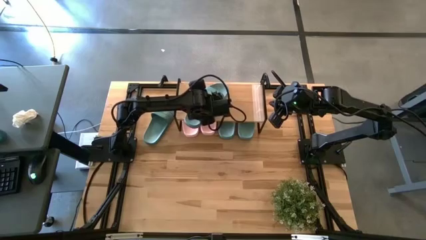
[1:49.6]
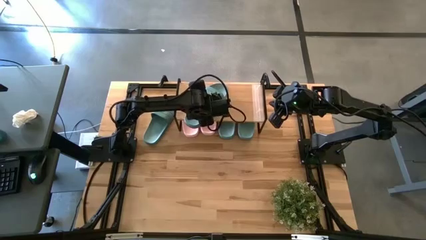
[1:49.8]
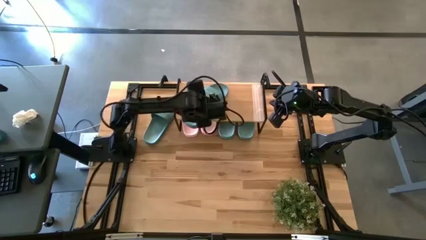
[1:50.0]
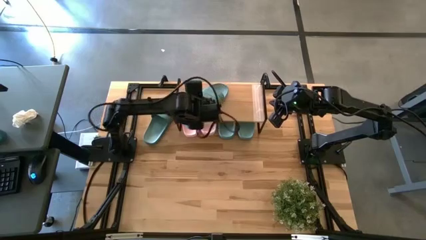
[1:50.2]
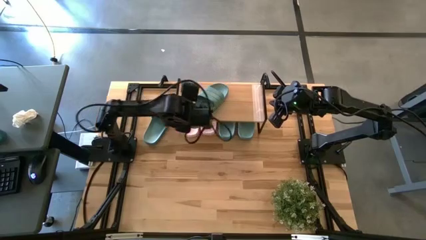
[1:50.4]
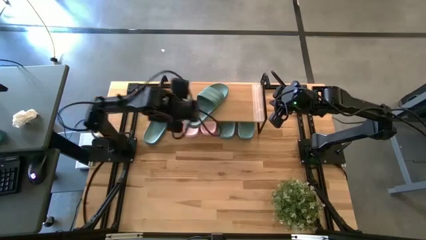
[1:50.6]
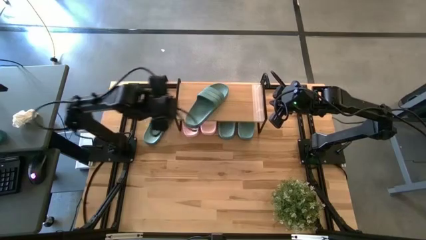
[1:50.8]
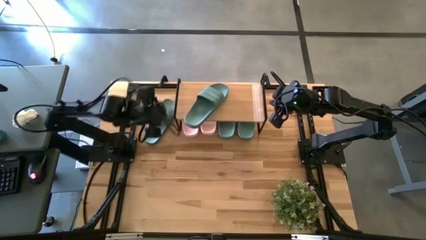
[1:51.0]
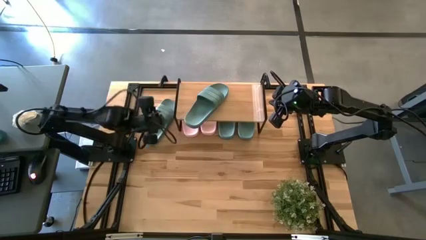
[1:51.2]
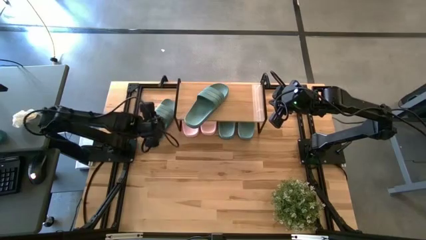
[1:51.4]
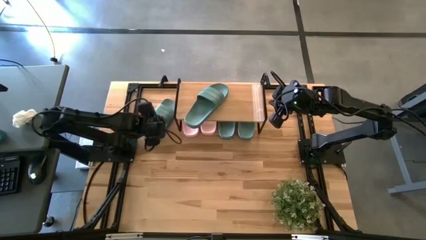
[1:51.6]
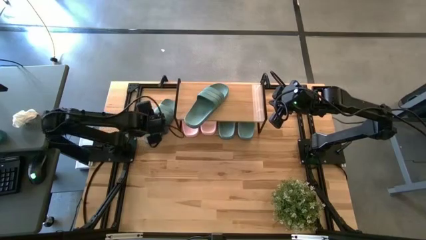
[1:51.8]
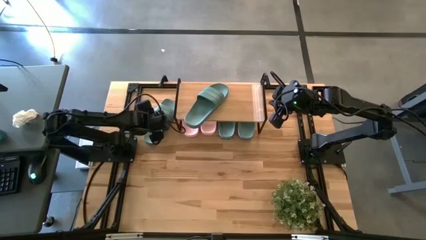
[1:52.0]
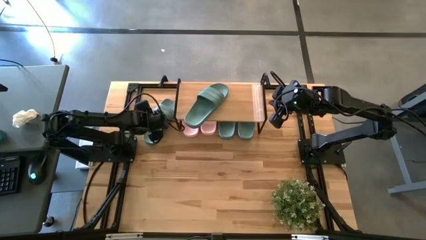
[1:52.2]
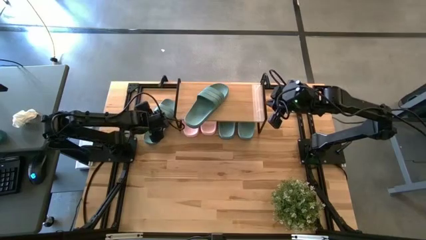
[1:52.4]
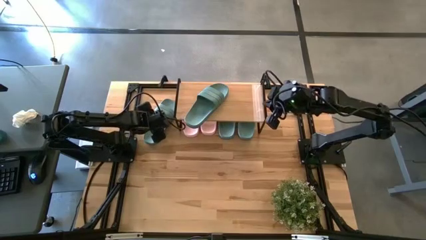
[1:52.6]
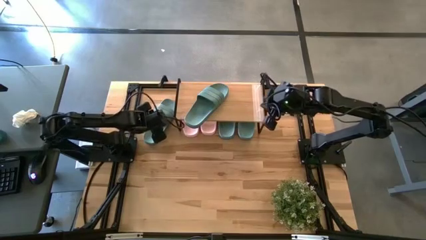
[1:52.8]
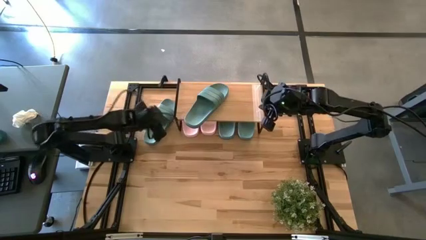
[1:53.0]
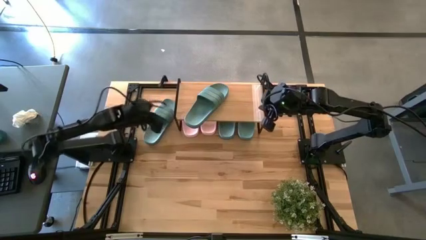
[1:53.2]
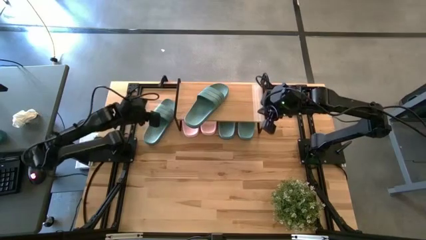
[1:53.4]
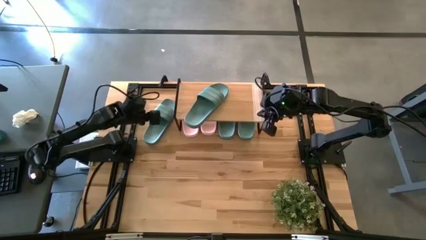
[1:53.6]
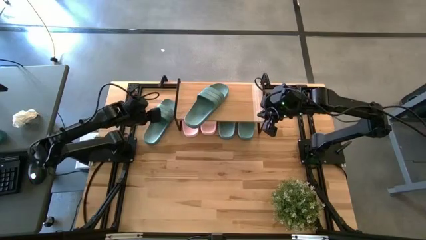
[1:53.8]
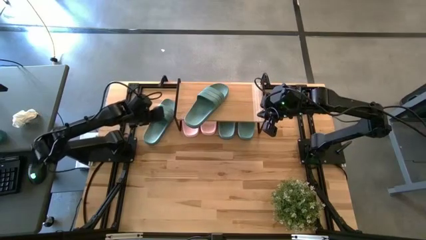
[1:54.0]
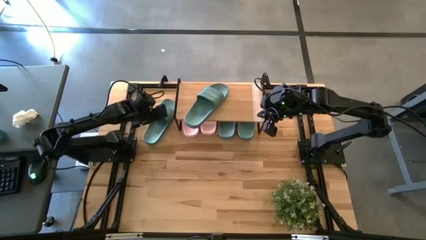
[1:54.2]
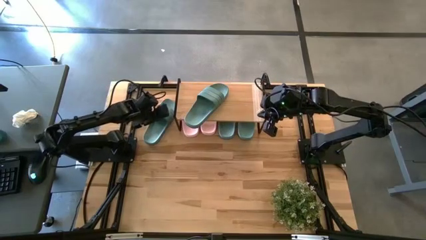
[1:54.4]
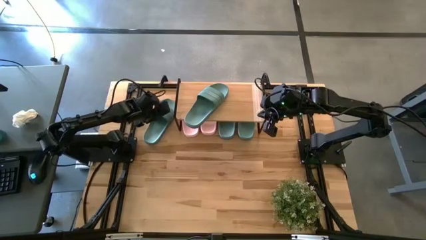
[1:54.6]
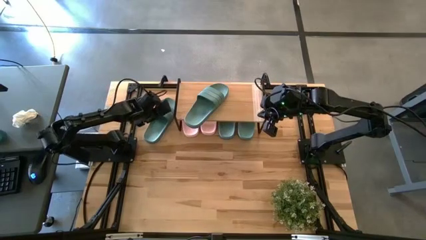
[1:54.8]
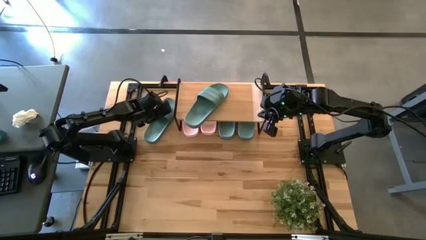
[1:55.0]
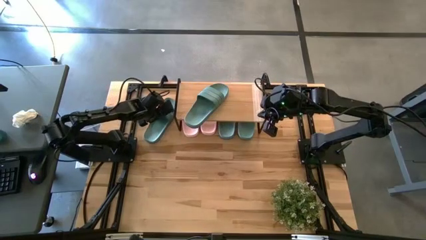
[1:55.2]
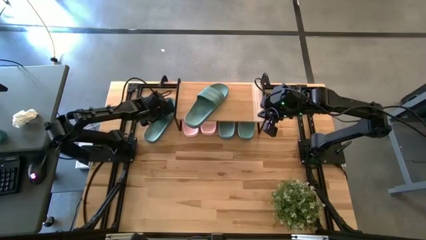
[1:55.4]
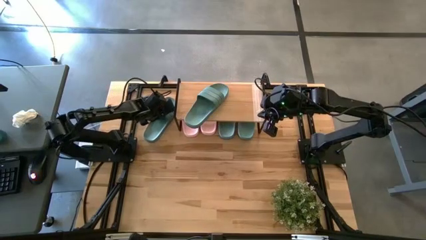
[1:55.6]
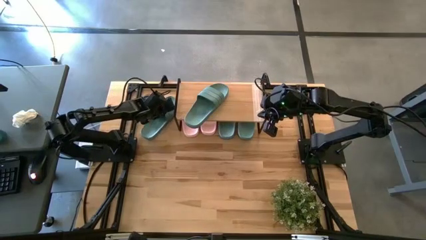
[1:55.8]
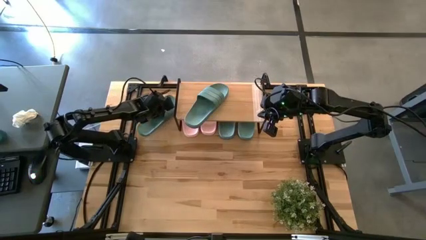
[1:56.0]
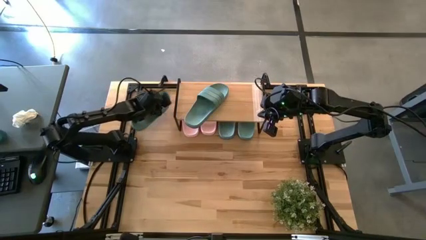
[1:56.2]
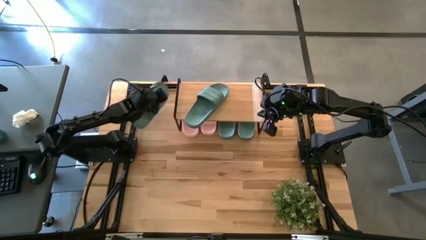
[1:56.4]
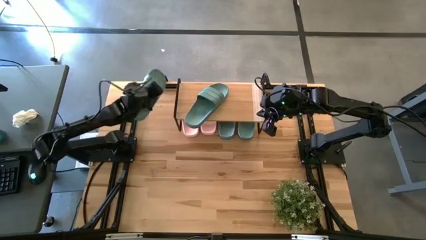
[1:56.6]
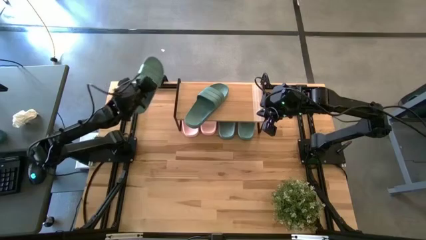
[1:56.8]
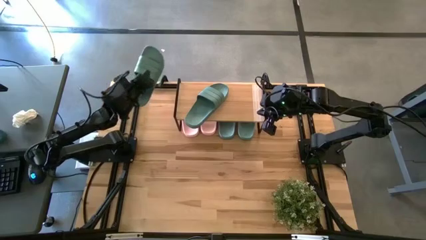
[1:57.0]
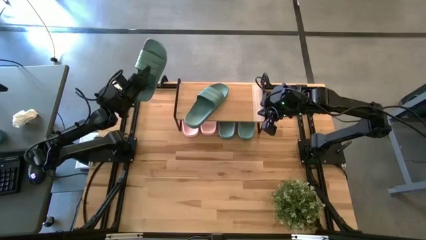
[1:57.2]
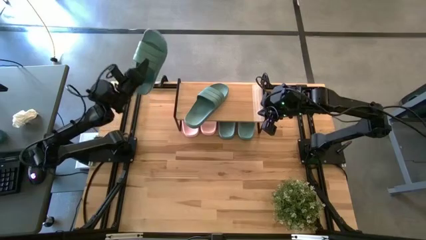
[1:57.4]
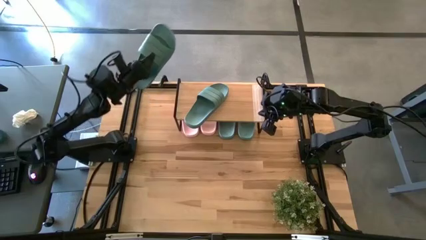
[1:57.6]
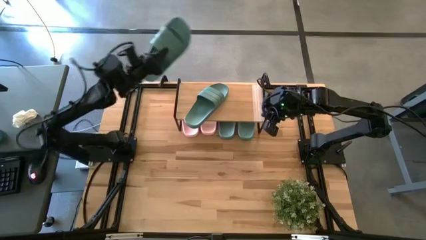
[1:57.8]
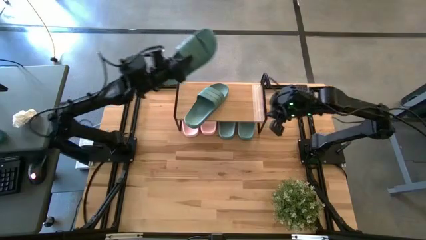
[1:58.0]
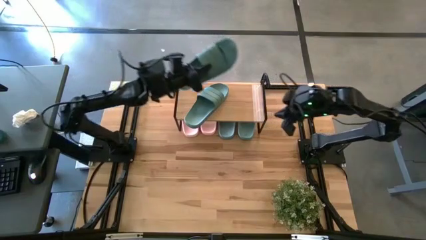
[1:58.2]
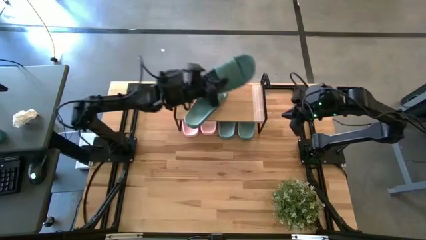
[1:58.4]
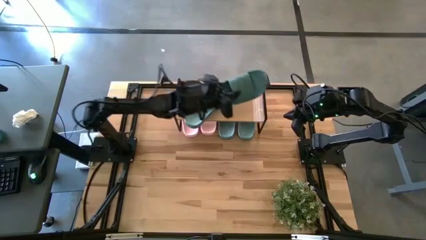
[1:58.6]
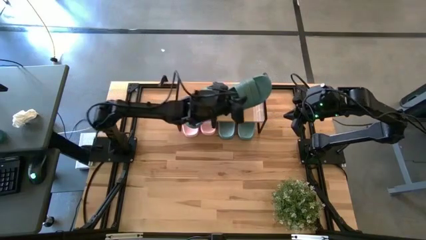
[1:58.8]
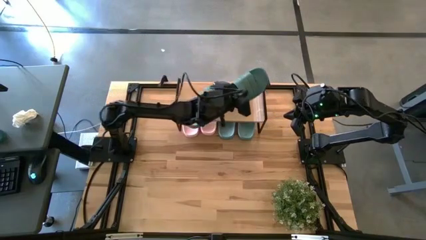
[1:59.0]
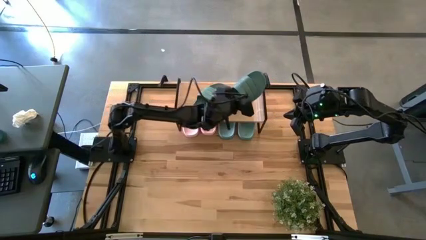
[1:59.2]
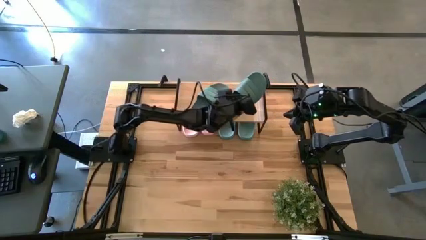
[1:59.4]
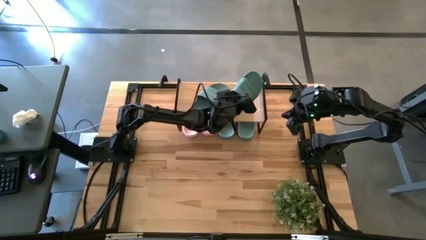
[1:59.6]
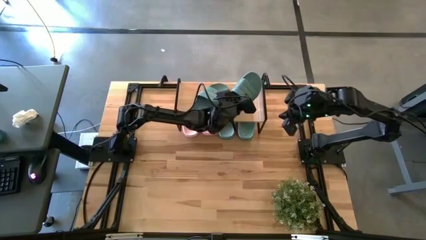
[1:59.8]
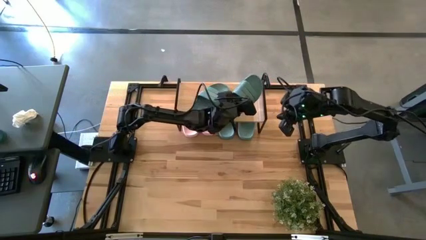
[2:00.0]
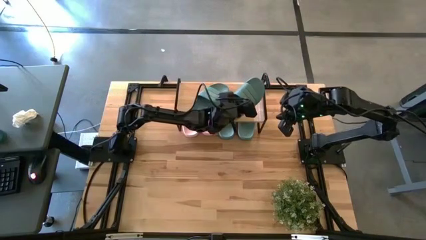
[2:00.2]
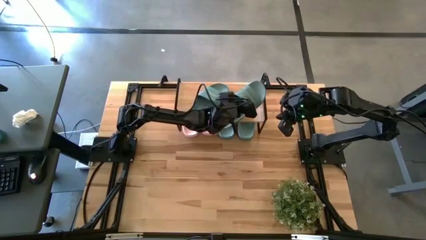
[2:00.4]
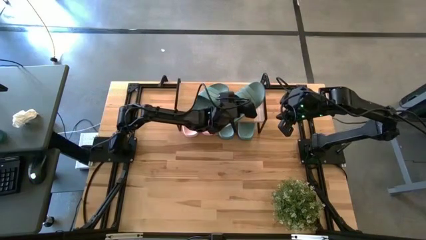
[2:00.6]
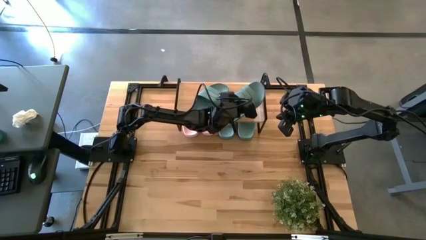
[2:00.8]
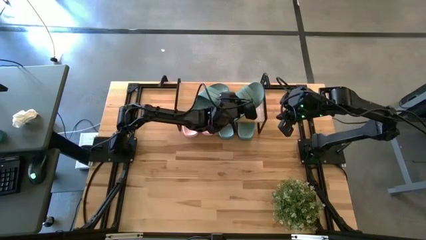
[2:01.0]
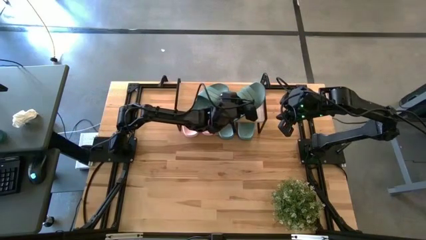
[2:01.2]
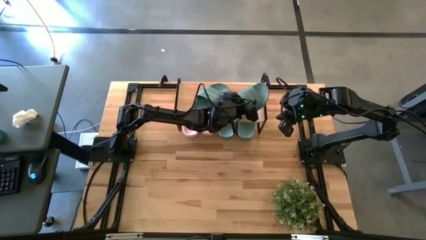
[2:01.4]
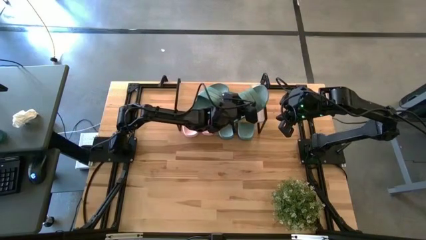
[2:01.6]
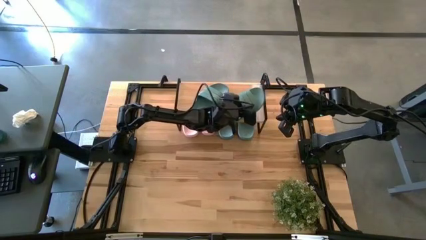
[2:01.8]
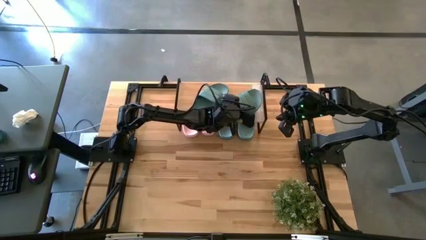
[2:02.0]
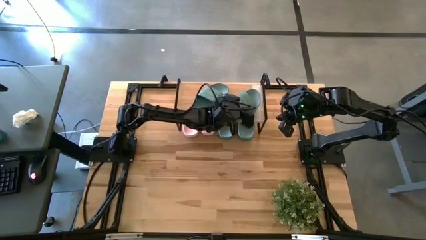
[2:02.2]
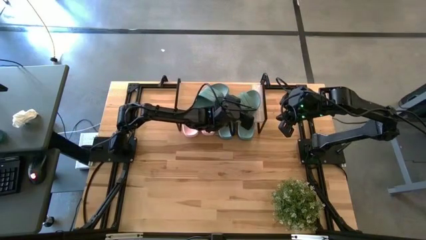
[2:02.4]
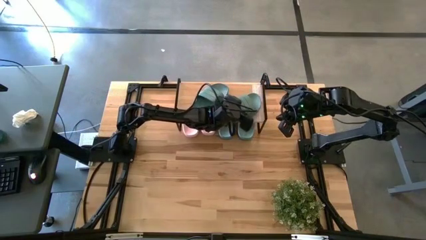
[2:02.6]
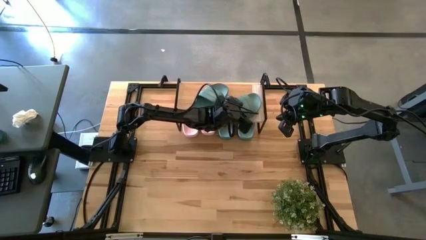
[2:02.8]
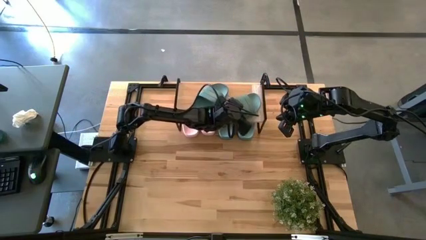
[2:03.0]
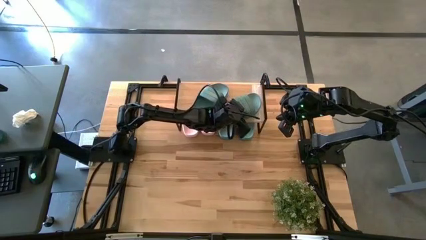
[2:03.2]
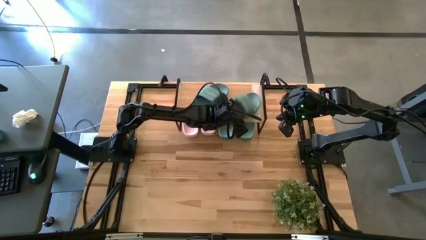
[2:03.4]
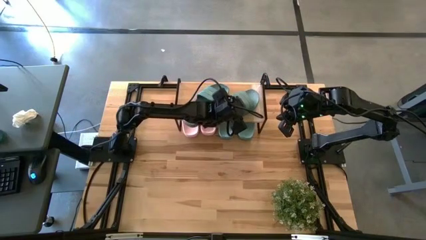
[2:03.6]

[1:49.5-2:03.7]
Task: Pick and place slides into the shelf
Put the green slide on the shelf
